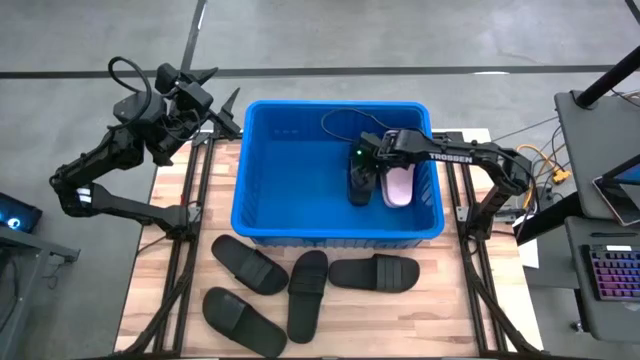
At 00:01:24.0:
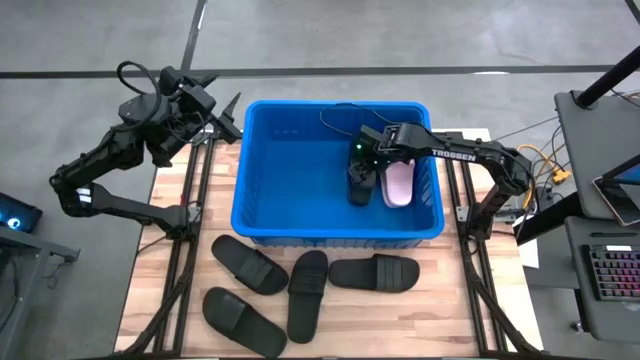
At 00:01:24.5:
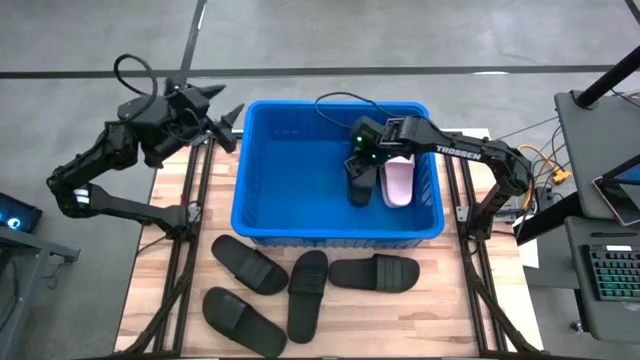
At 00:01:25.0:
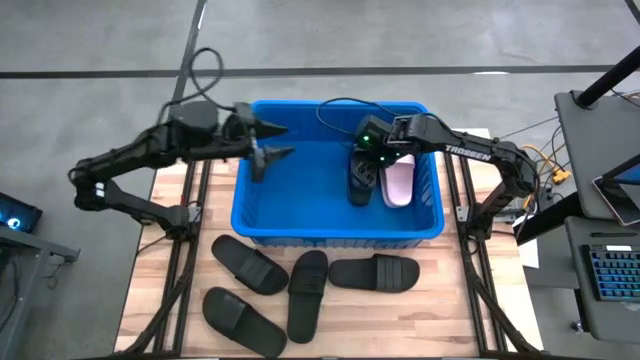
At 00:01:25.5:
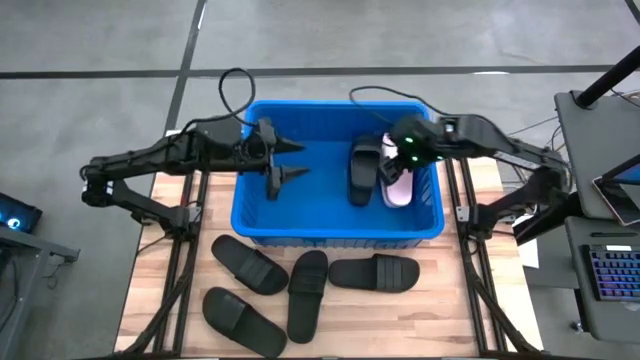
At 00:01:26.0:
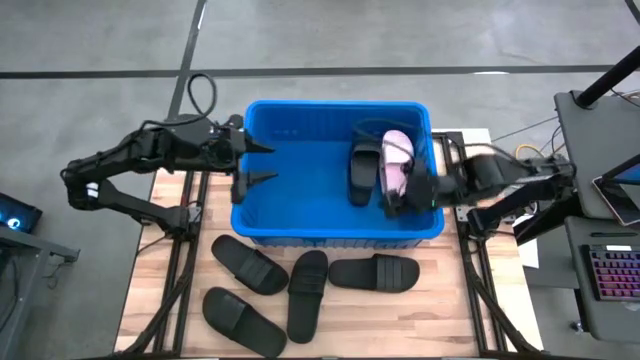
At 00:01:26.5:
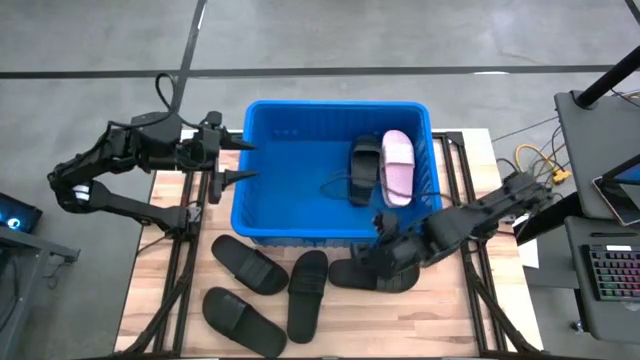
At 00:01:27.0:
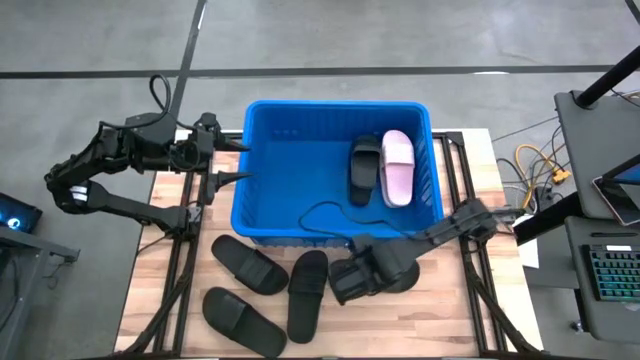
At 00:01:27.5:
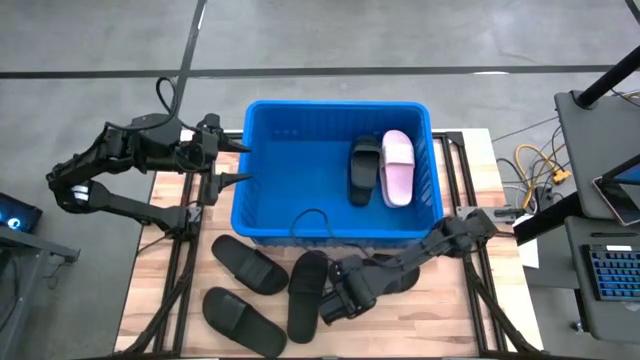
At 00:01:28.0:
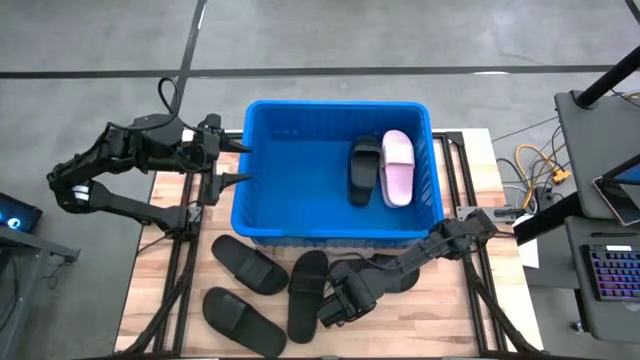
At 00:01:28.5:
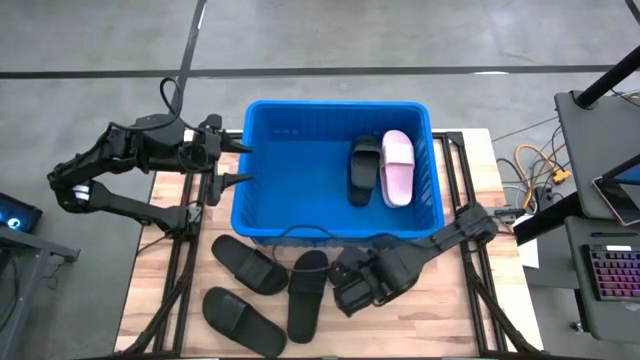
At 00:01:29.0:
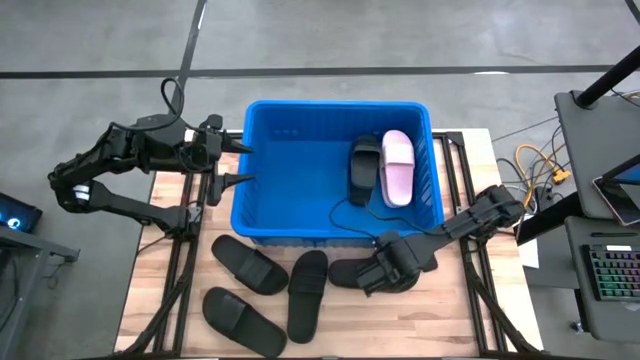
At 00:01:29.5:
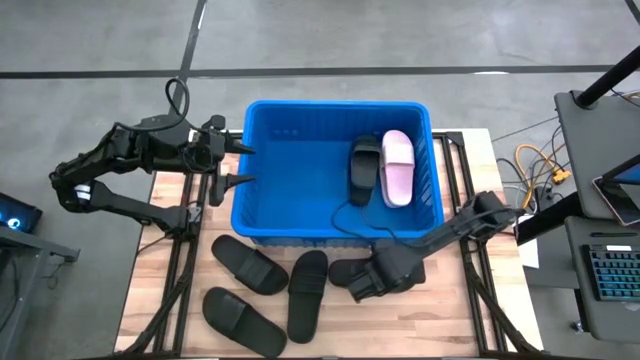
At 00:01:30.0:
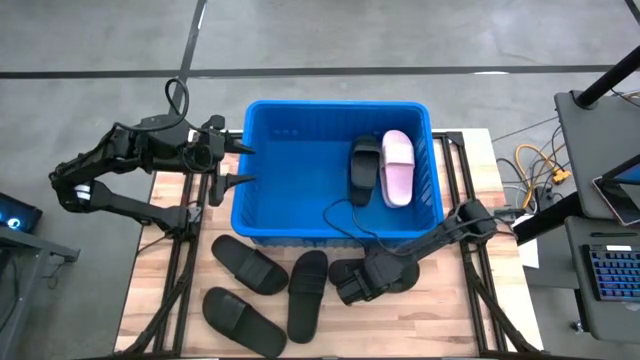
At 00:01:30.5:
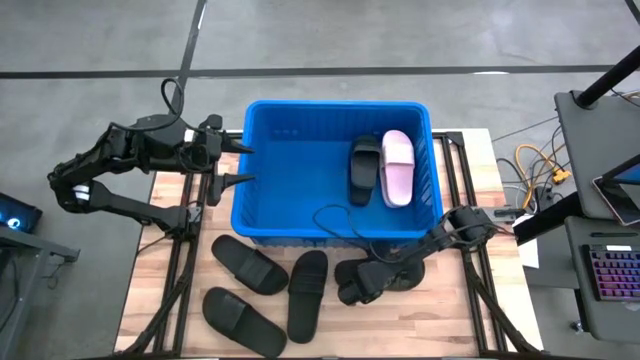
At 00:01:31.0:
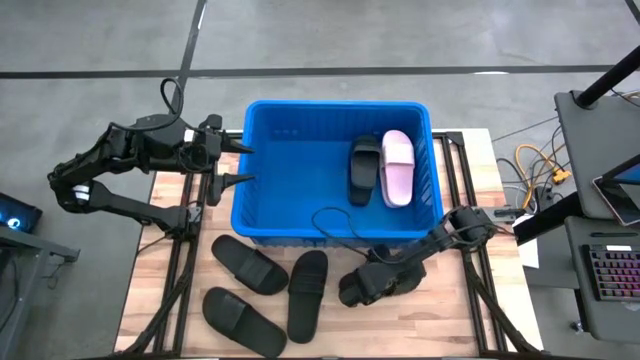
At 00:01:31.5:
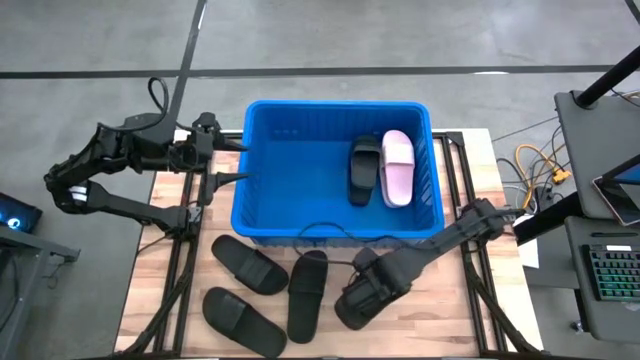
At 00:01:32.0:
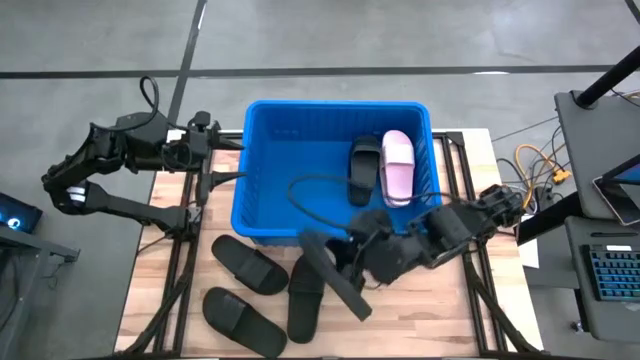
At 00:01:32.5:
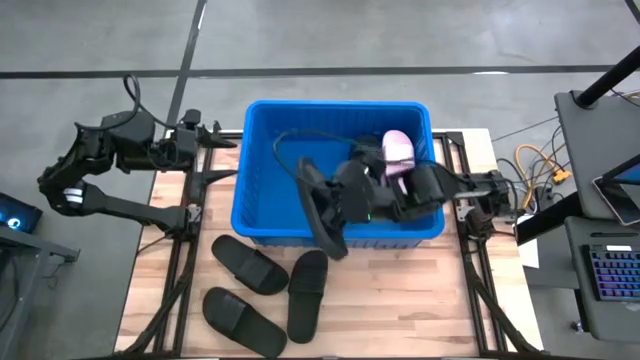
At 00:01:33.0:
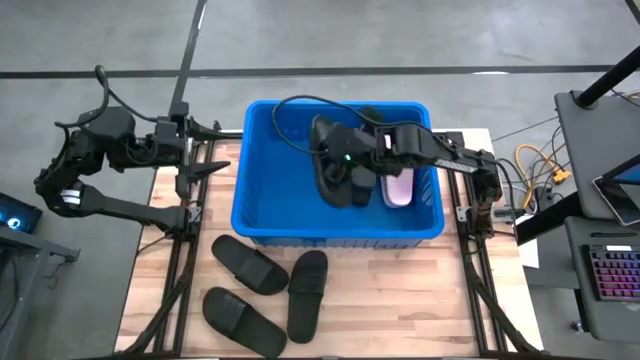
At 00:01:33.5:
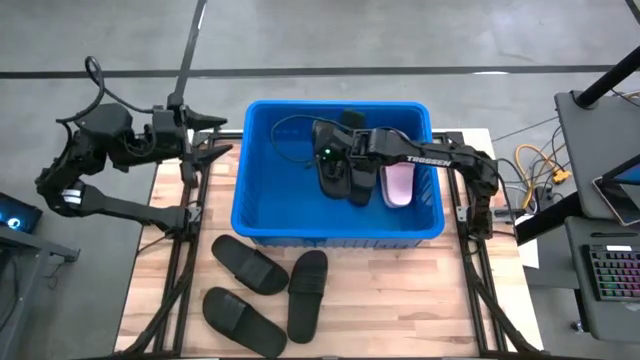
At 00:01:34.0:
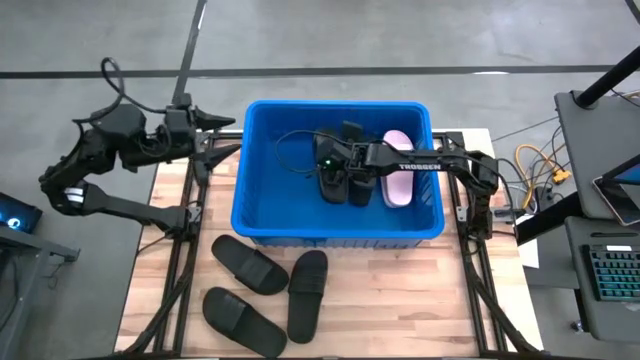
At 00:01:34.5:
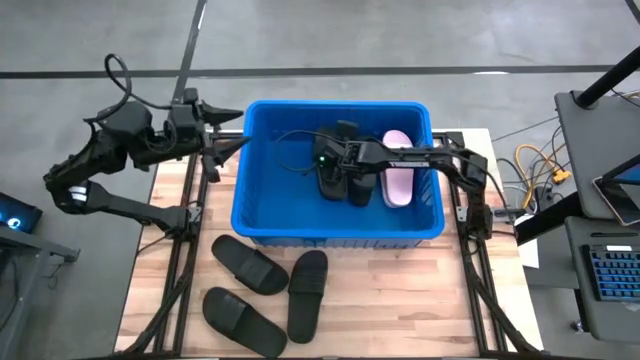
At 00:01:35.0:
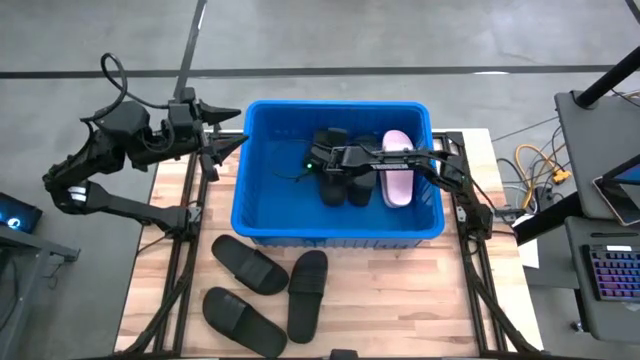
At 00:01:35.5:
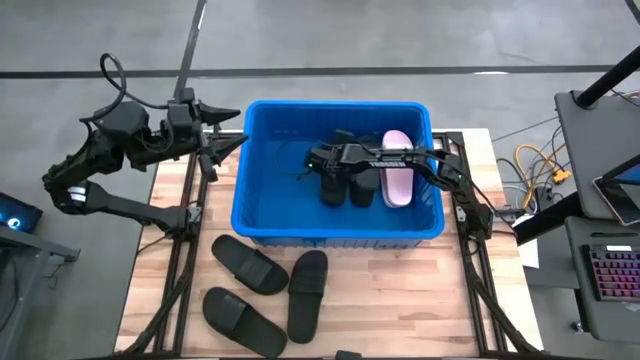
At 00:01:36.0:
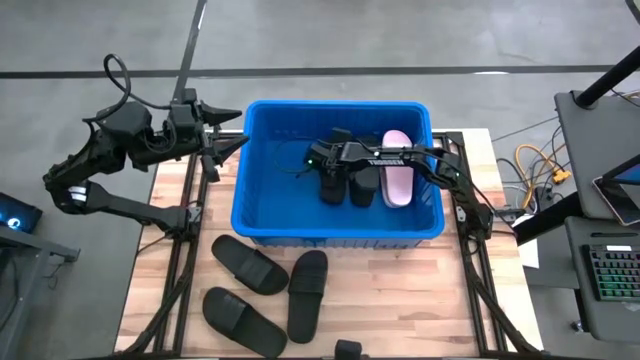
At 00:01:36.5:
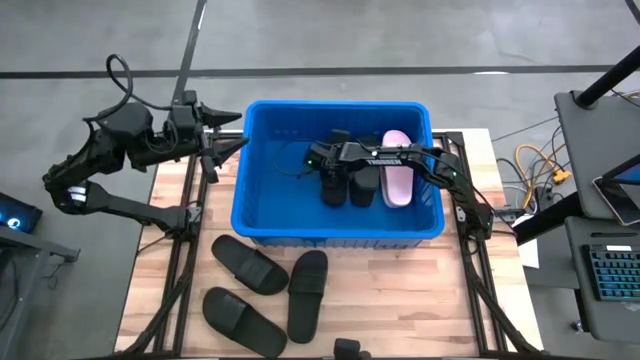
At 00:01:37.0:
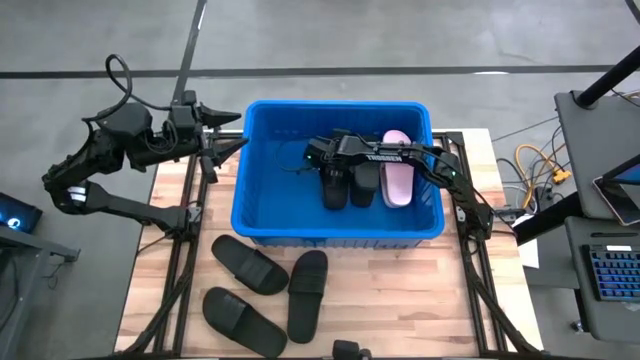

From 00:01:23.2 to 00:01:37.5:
Task: Pick and place slides into bin
Put the black slide into the blue bin

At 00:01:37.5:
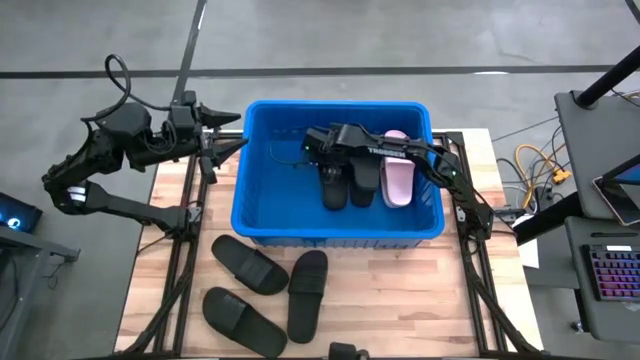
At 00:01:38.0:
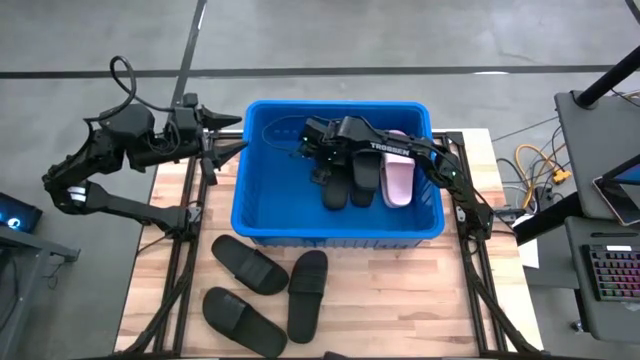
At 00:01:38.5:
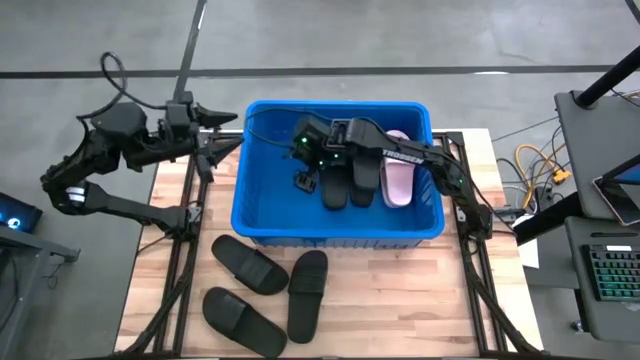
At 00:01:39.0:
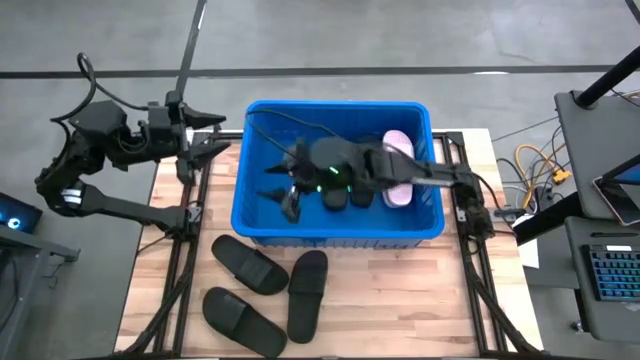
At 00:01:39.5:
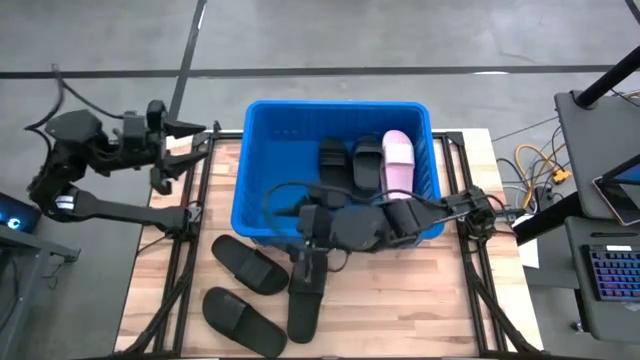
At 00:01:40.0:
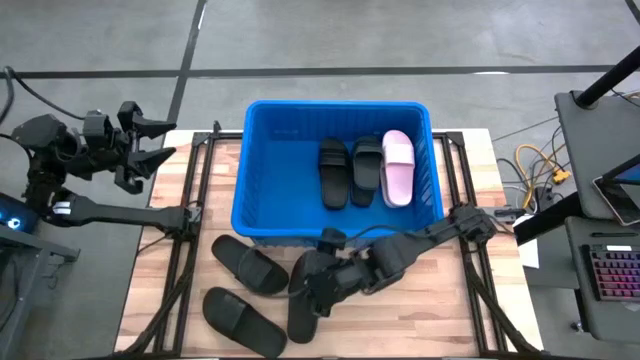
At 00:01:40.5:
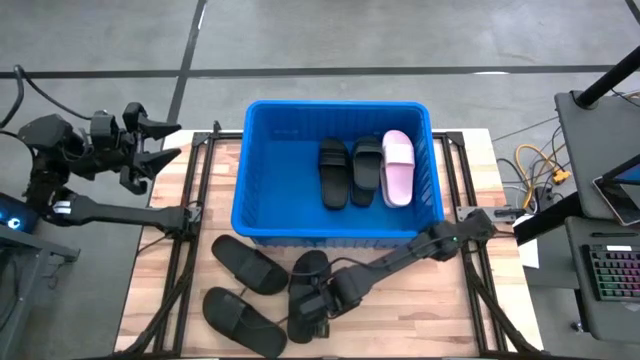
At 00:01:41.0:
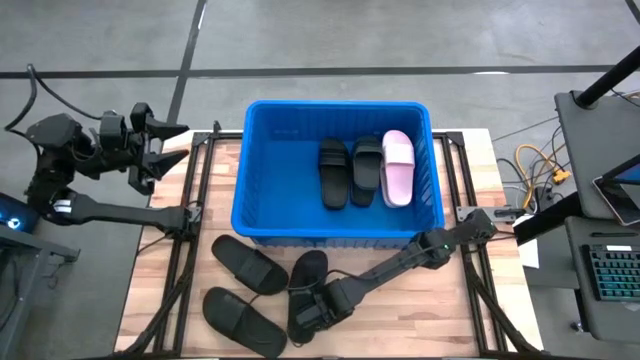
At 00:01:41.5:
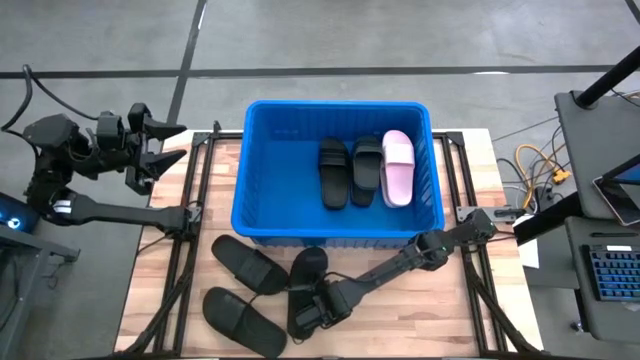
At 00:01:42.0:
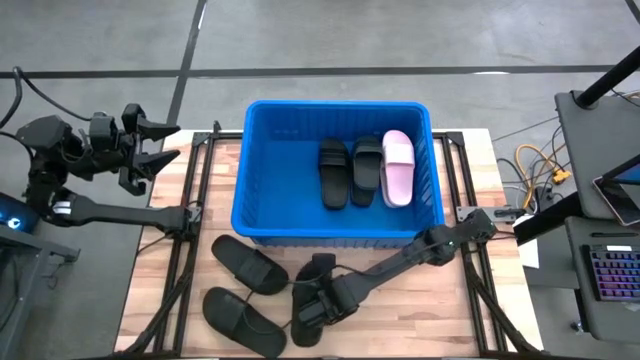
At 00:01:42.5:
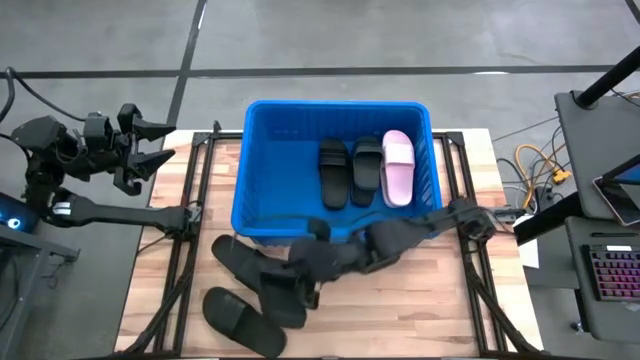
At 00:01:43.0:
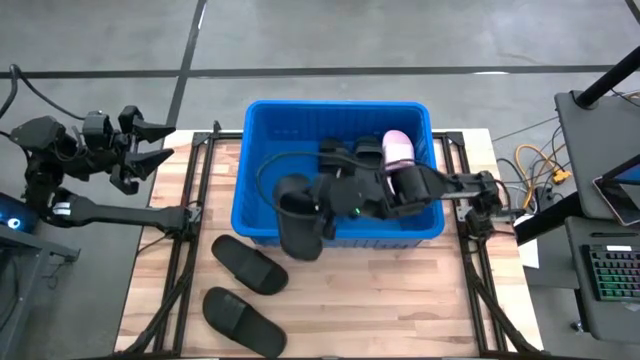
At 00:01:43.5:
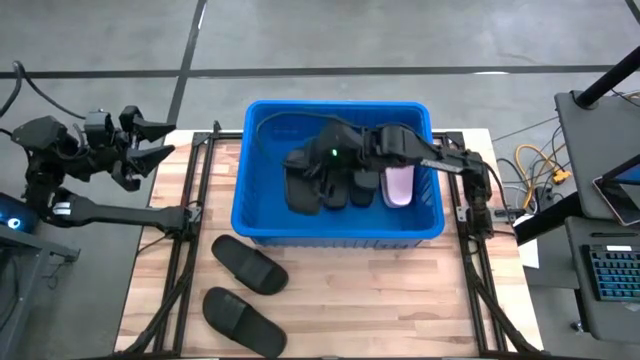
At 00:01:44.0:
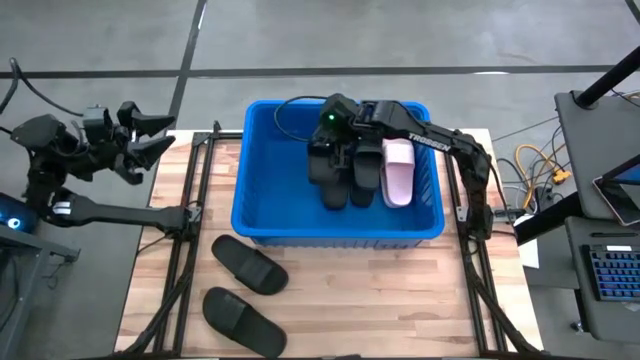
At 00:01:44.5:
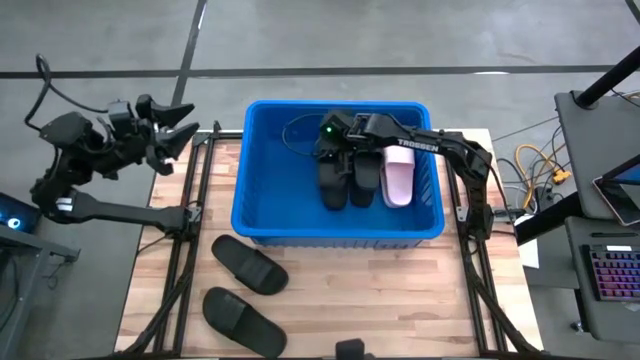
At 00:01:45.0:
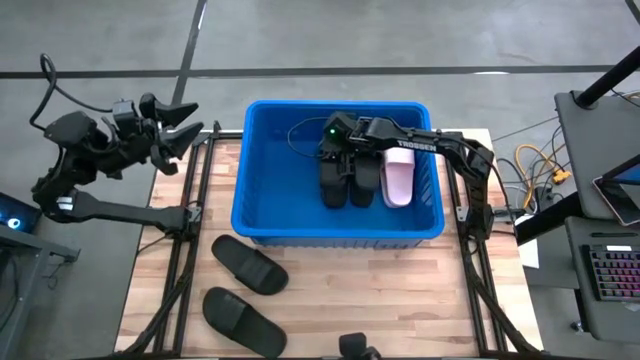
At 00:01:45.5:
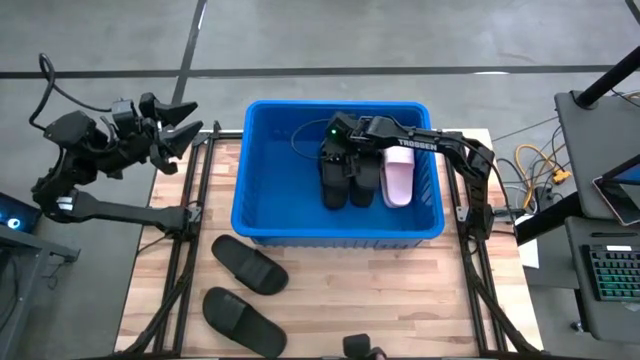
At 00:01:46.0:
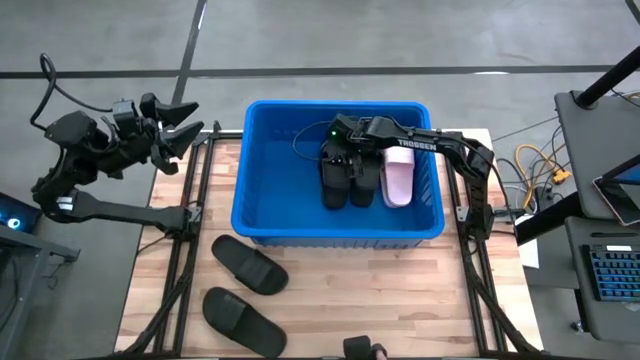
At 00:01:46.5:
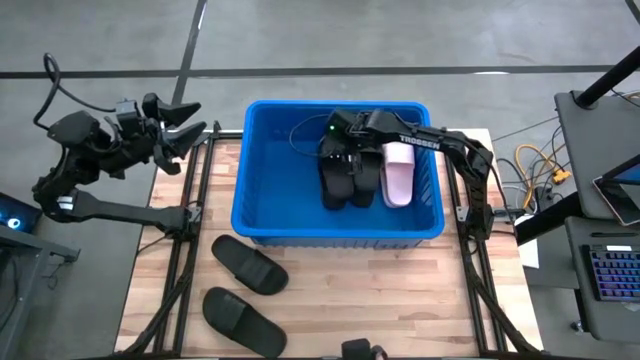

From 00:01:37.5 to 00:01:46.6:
Put the black slide into the blue bin
